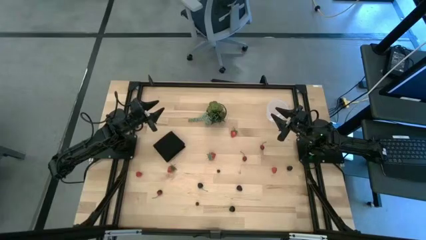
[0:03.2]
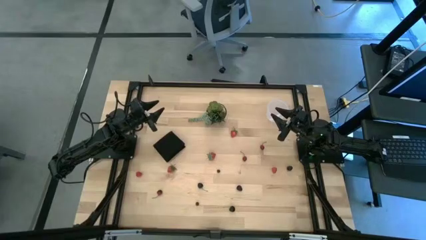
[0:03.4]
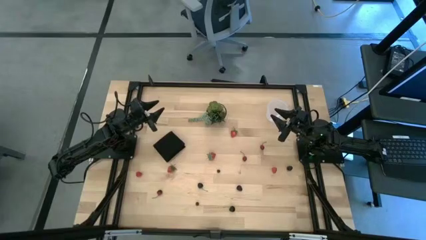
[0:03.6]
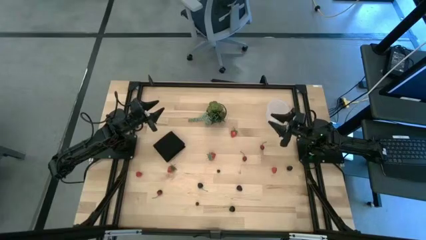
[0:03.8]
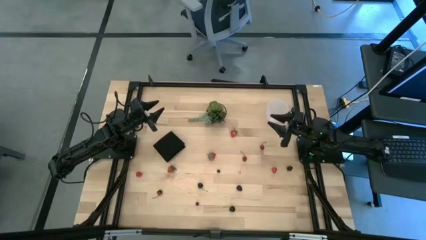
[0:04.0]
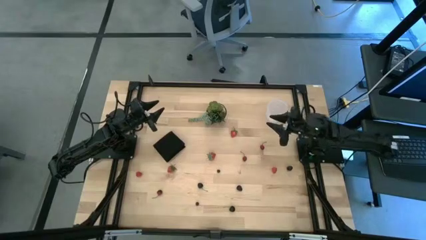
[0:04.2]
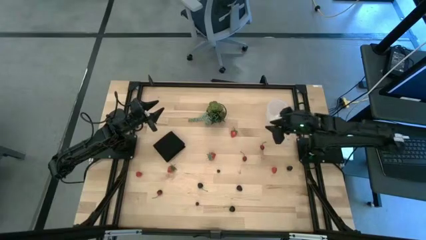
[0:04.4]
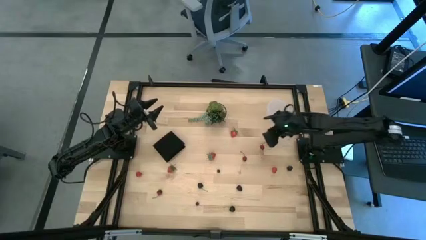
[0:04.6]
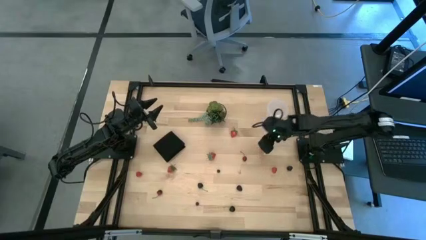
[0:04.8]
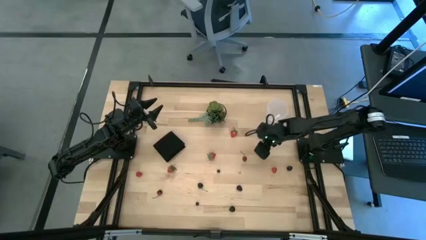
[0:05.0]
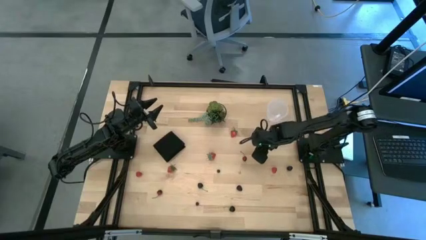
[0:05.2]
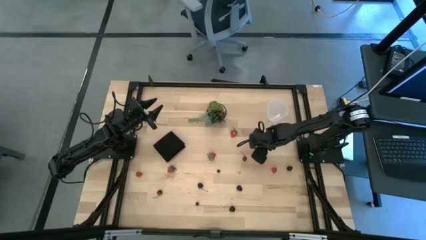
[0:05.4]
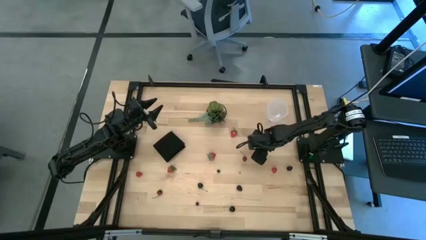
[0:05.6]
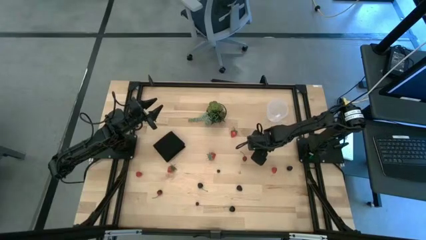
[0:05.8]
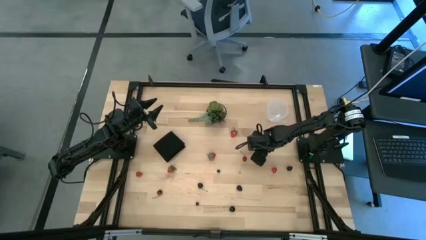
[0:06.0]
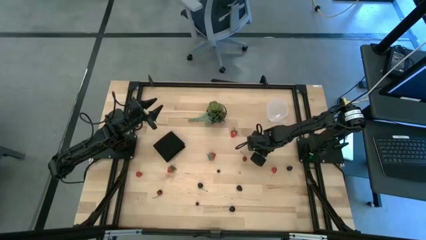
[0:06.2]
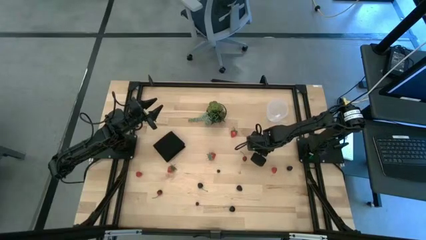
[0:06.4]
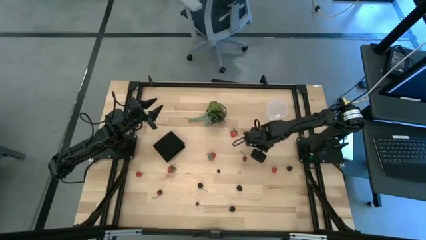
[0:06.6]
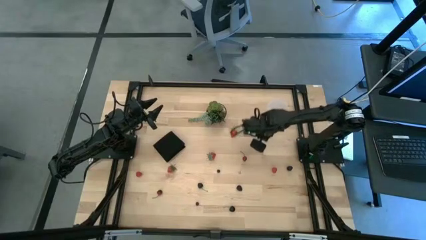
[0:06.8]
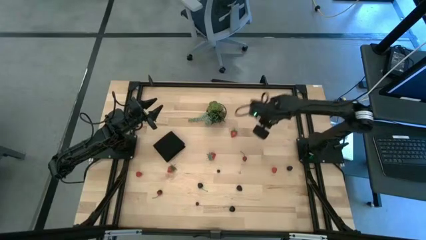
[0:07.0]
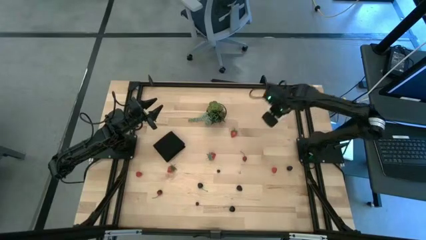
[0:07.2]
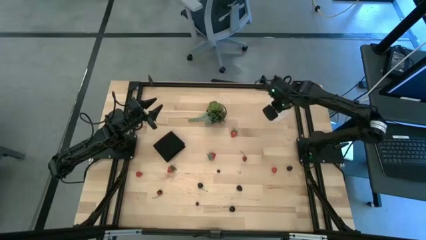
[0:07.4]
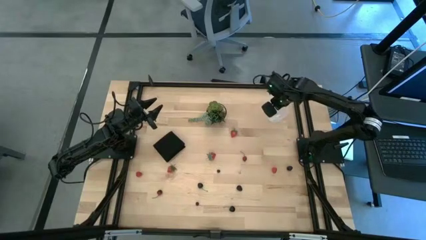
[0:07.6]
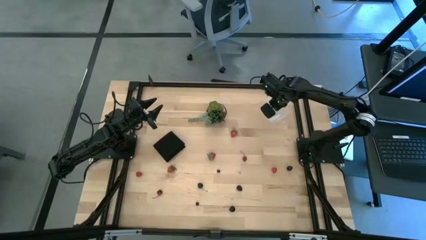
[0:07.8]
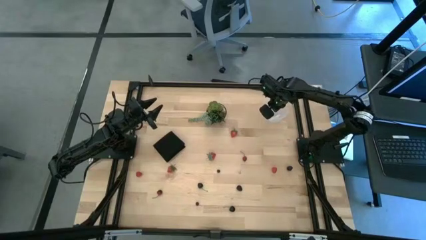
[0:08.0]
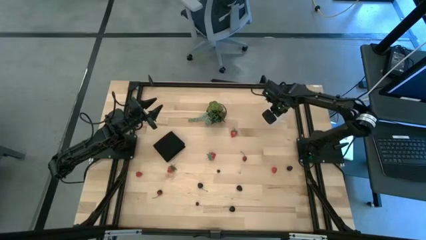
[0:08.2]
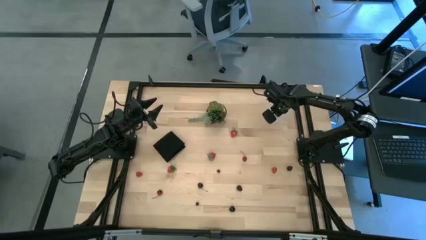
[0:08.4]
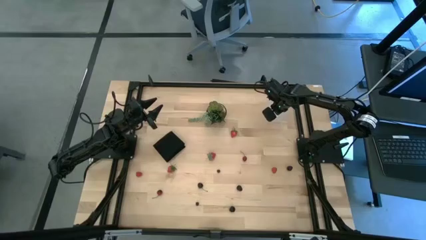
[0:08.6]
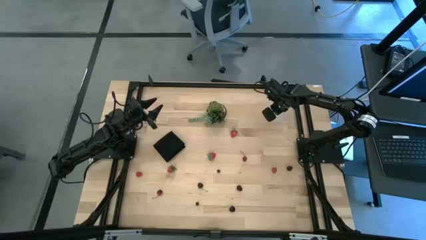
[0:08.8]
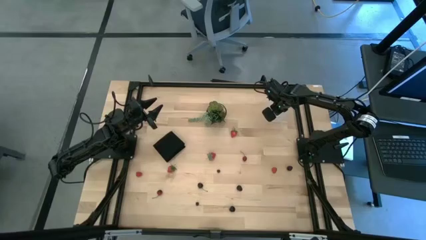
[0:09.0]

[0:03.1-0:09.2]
Task: Pick and placing Produce into tupperware
Put the top red cherry into the bin

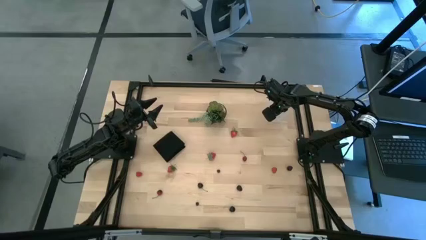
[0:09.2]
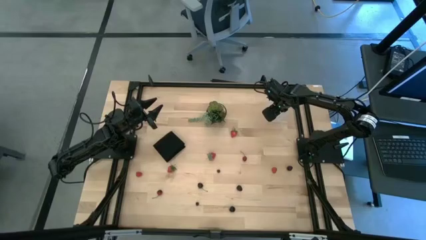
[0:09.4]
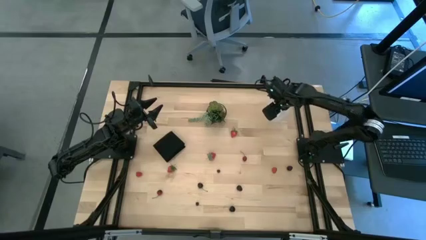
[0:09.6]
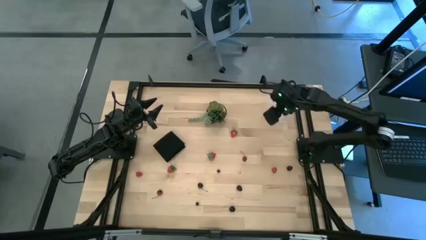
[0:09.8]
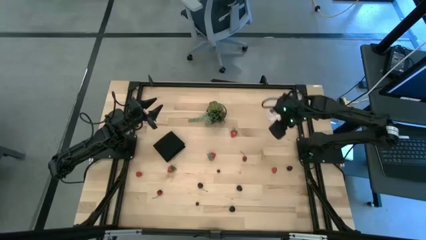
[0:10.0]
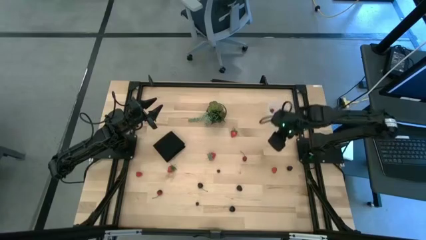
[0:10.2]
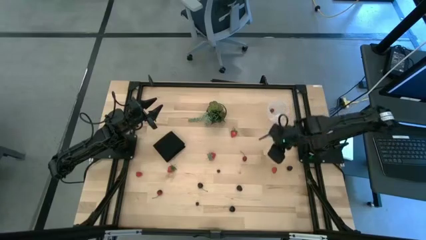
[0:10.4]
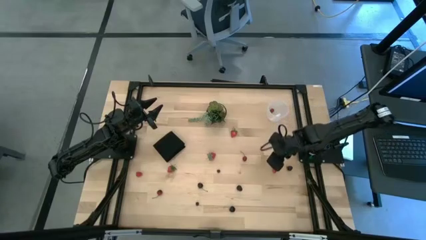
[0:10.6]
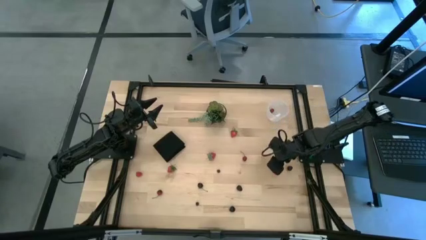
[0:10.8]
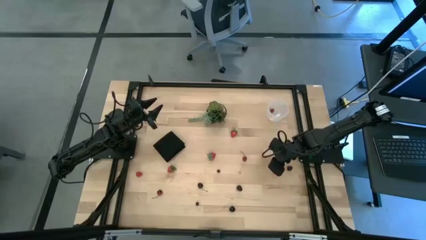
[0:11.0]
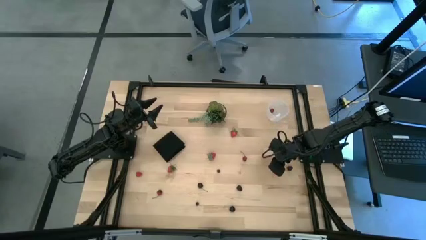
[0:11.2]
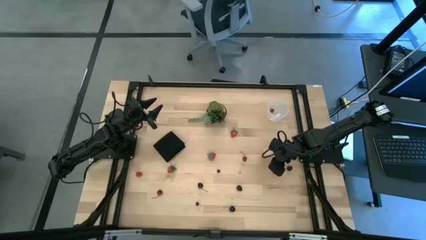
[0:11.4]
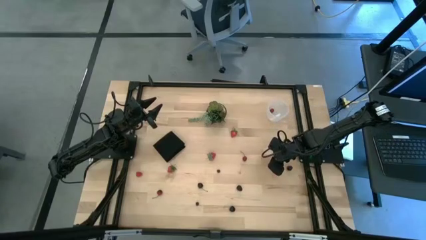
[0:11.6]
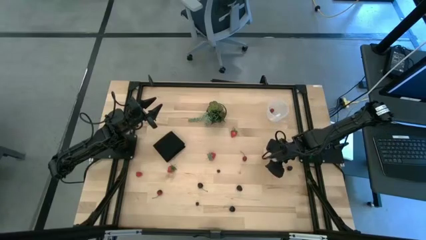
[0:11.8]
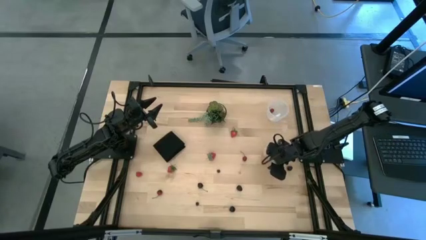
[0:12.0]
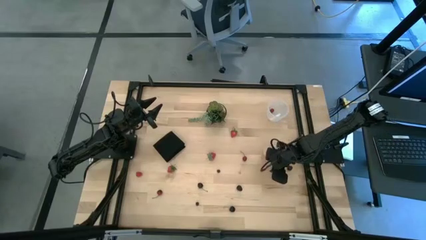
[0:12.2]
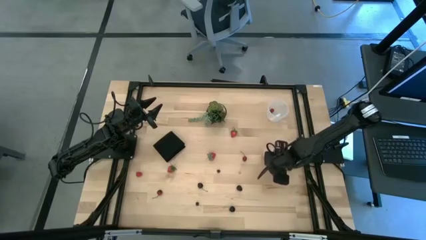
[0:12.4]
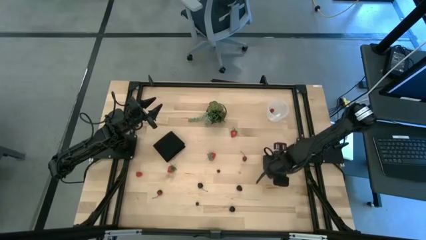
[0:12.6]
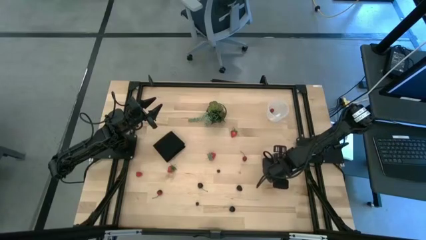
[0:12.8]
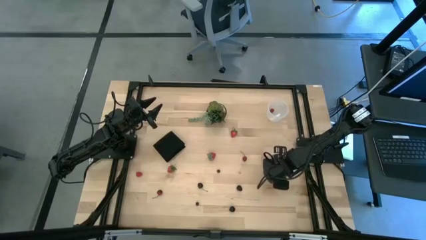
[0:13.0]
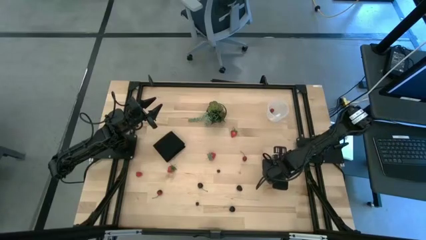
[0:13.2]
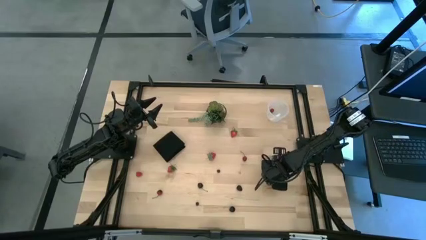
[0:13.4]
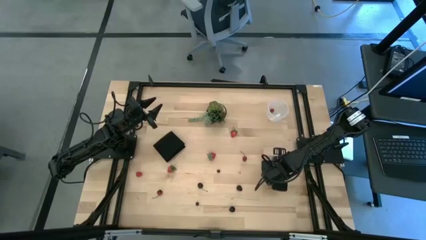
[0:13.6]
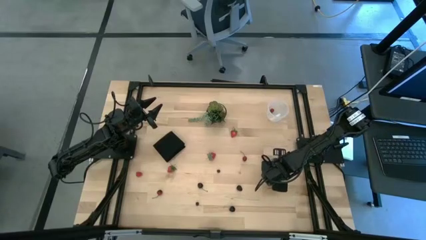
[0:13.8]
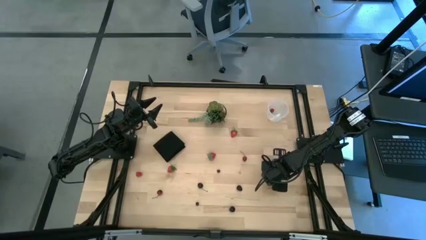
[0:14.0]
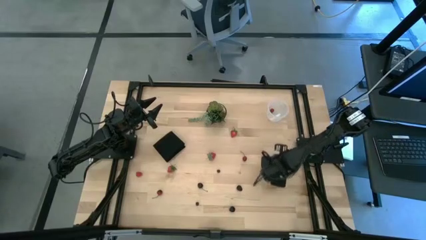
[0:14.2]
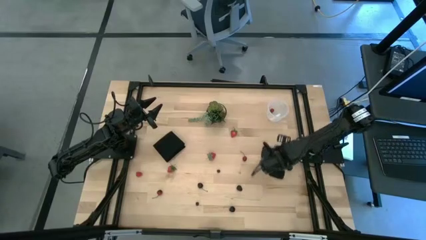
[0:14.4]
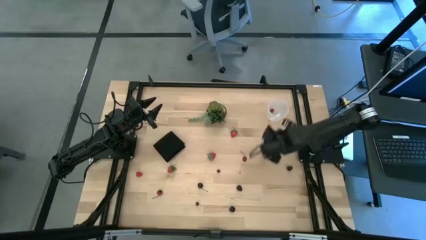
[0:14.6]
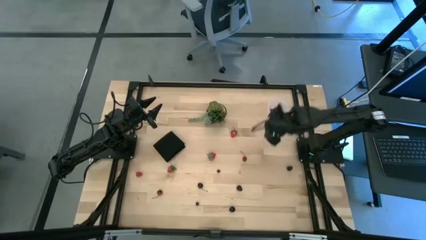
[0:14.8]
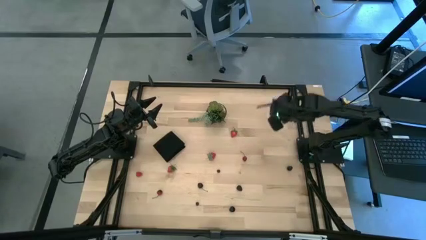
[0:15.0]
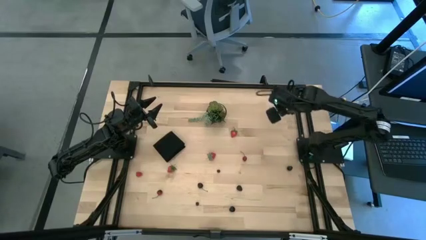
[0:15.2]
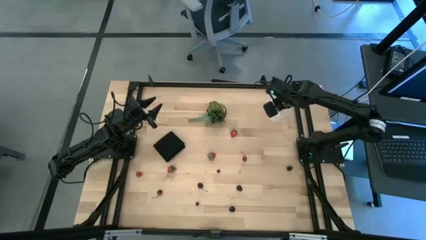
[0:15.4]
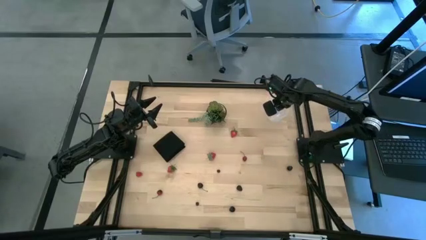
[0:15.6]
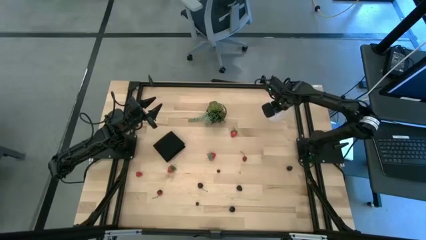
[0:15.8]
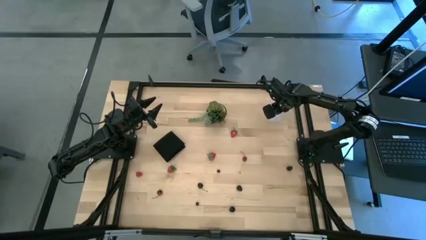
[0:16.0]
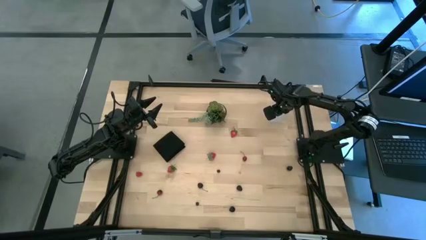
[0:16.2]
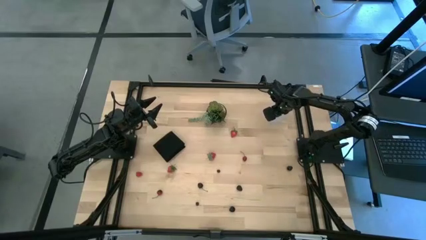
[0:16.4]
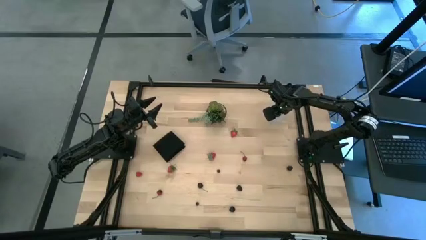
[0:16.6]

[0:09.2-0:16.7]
Put the right red raspberry into the bin

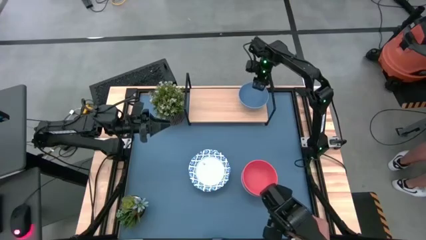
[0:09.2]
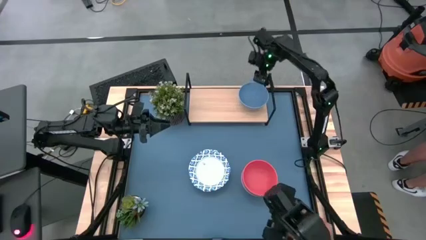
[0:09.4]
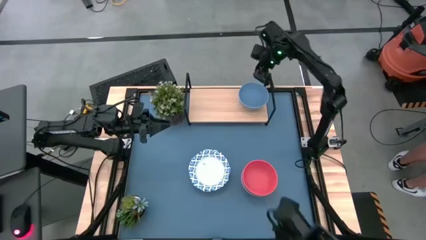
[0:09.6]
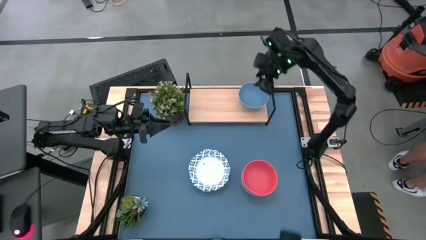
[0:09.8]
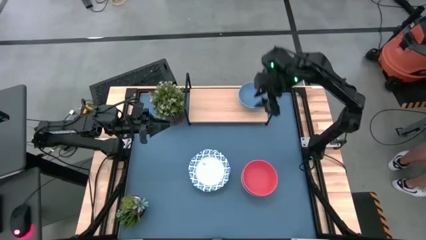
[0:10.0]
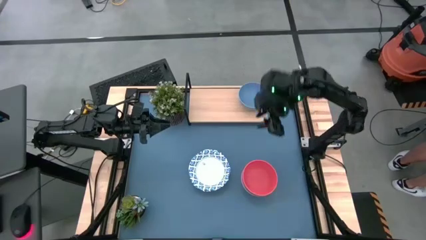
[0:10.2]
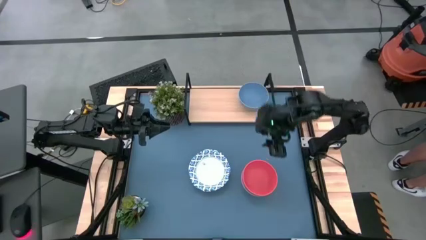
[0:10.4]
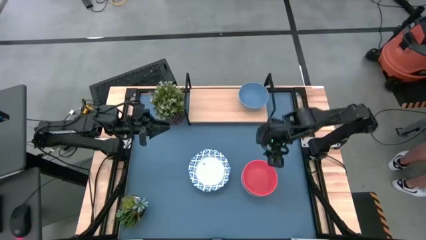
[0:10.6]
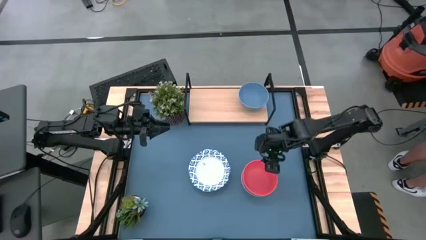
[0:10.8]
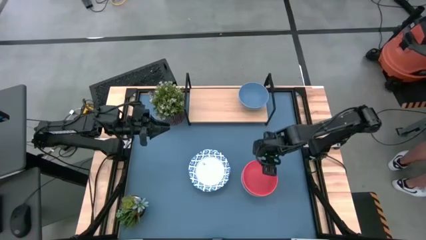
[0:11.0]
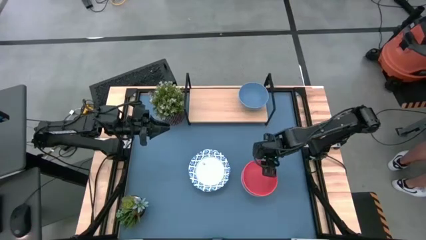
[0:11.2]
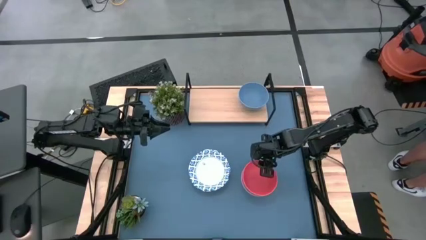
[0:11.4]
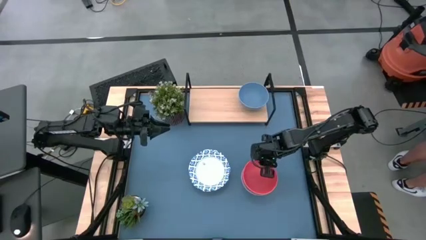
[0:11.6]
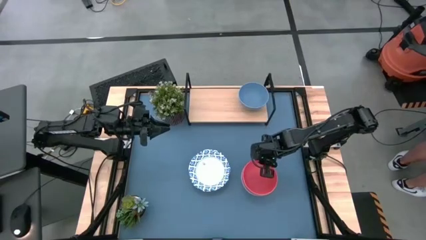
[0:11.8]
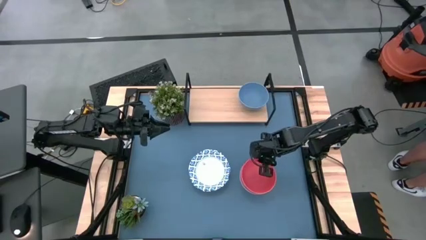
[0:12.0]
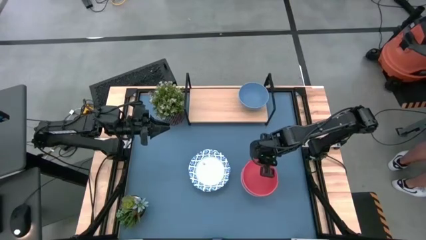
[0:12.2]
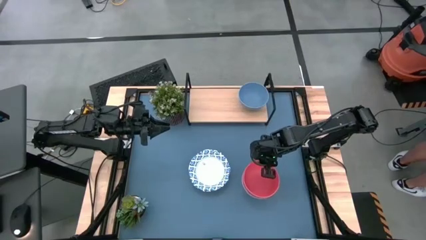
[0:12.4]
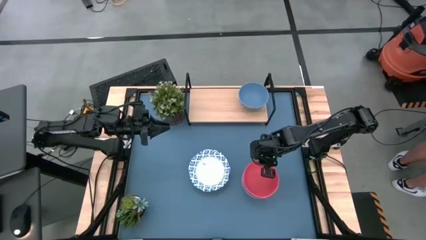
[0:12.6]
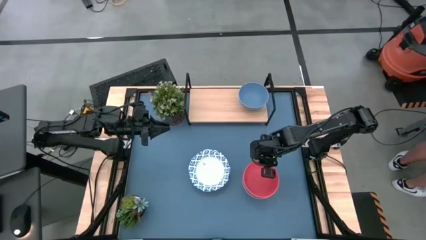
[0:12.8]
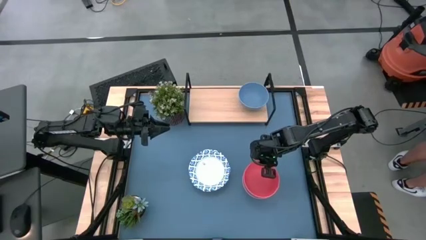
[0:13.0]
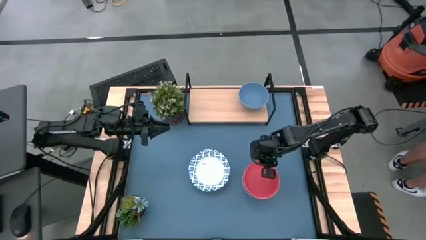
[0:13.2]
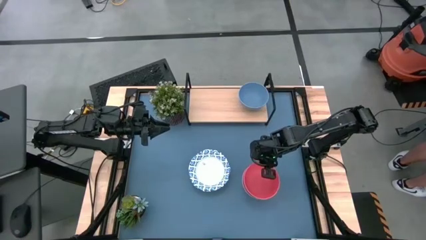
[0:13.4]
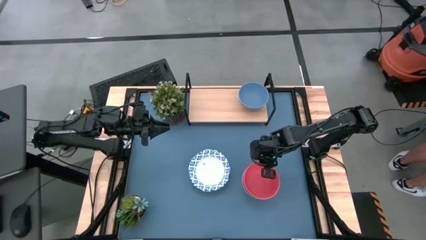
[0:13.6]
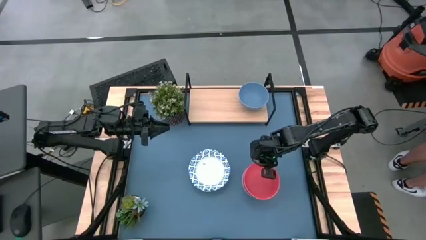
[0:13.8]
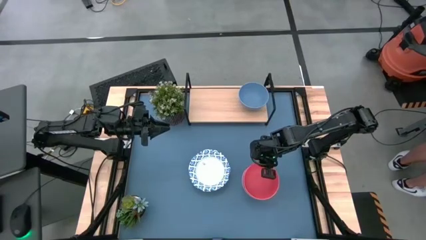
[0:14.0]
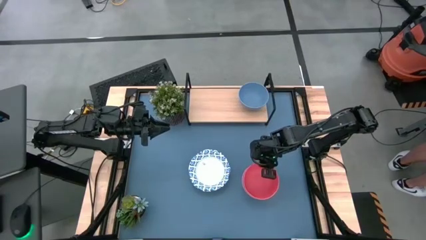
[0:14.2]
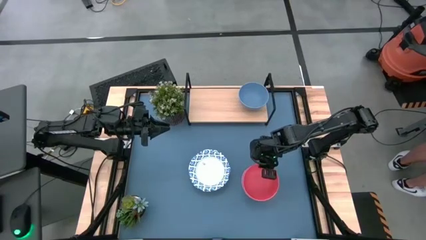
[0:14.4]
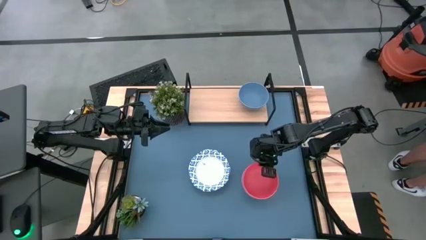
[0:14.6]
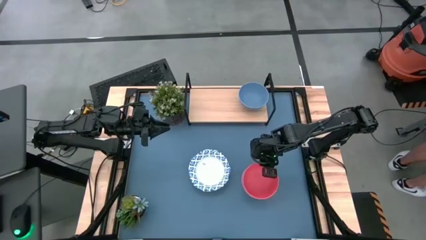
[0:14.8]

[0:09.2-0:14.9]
Task: Place and stack bowls onto a shelf
Stack the orange bowl on top of the blue bowl on the shelf
